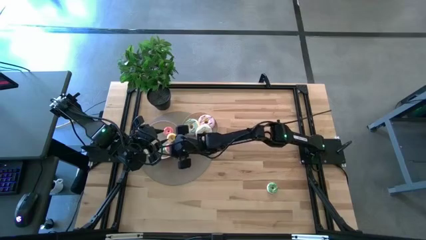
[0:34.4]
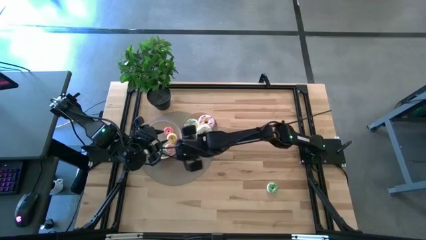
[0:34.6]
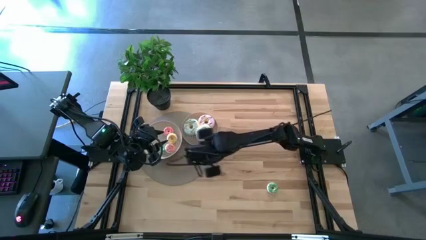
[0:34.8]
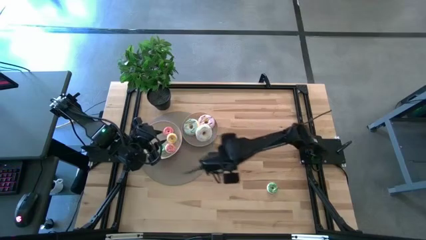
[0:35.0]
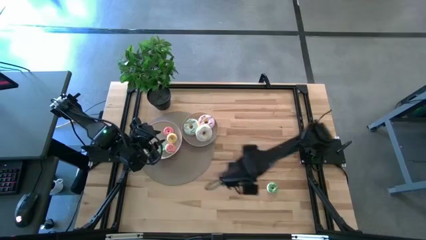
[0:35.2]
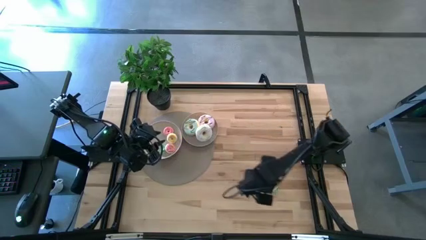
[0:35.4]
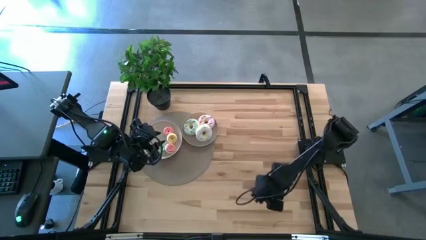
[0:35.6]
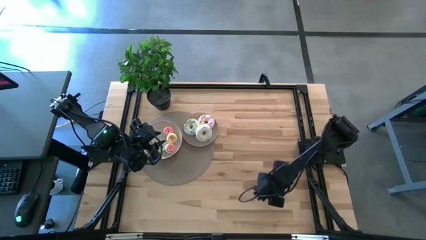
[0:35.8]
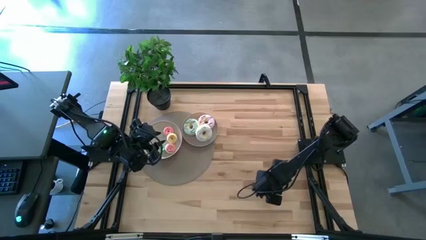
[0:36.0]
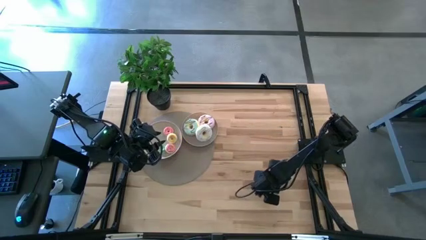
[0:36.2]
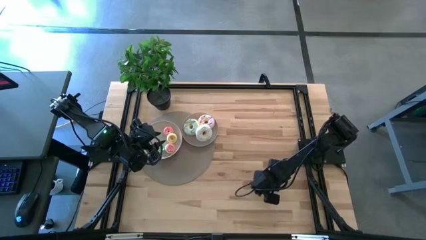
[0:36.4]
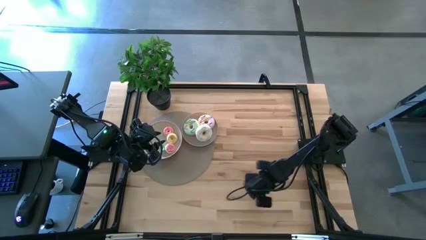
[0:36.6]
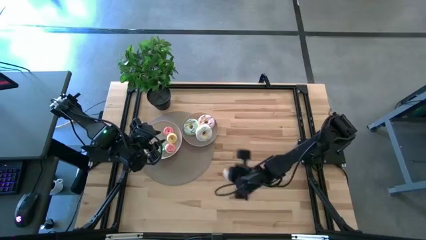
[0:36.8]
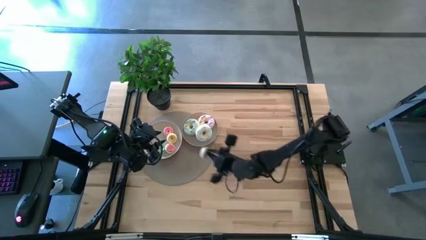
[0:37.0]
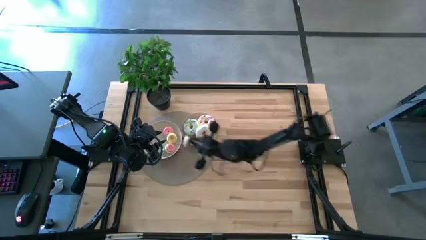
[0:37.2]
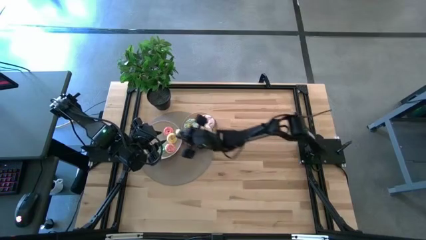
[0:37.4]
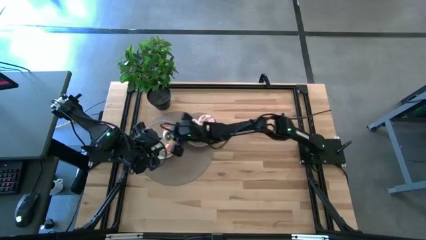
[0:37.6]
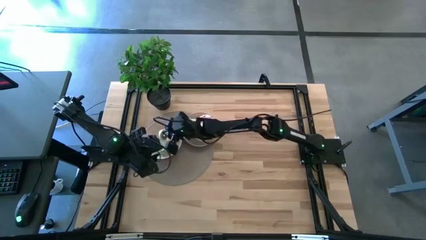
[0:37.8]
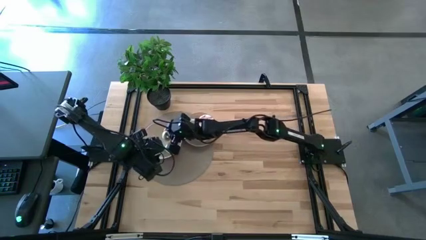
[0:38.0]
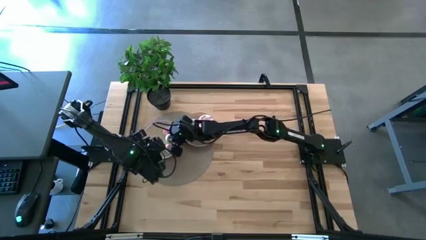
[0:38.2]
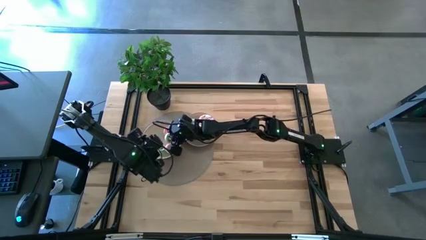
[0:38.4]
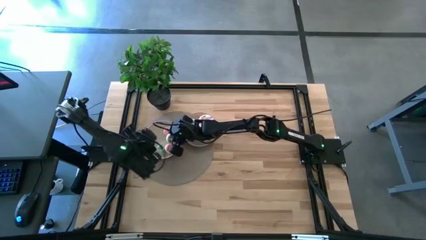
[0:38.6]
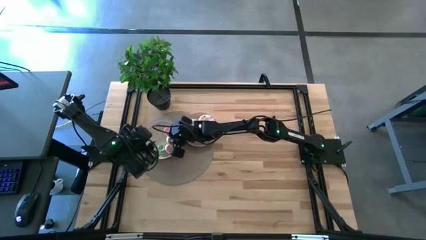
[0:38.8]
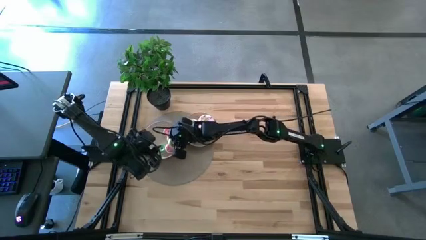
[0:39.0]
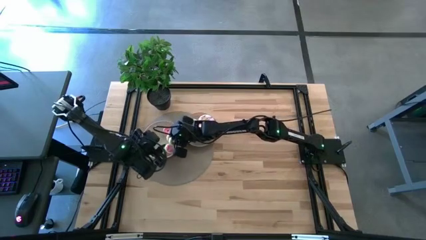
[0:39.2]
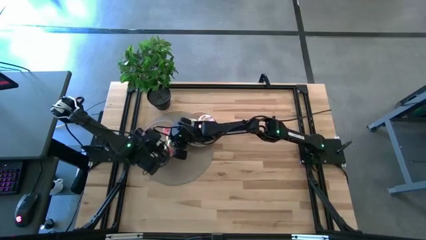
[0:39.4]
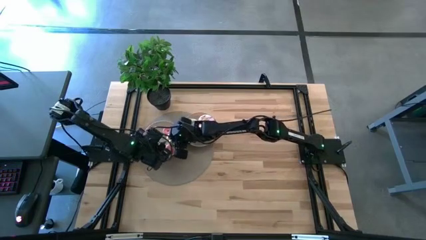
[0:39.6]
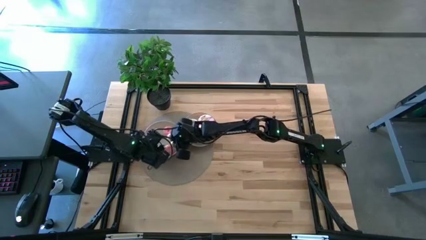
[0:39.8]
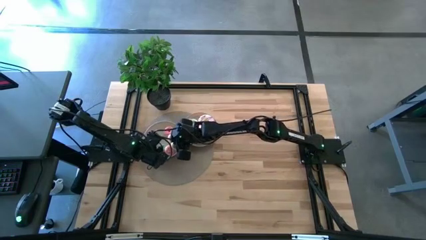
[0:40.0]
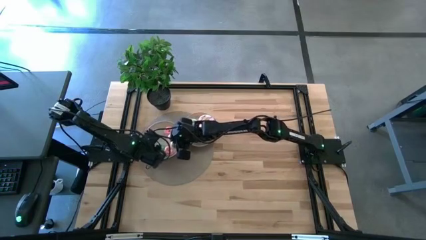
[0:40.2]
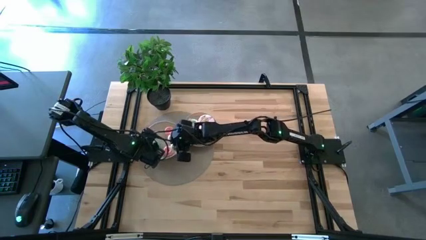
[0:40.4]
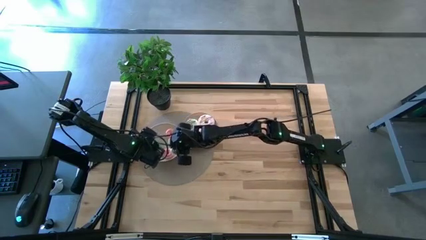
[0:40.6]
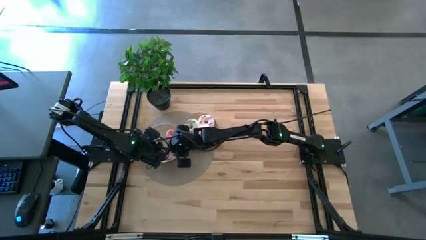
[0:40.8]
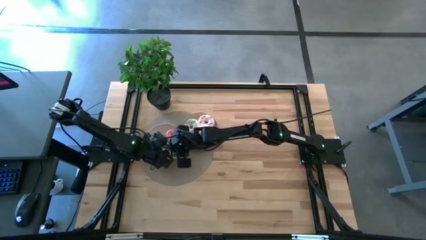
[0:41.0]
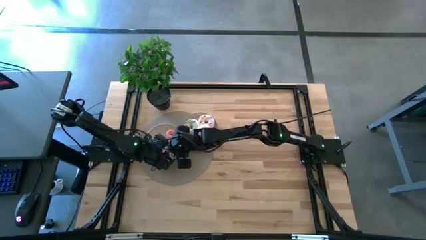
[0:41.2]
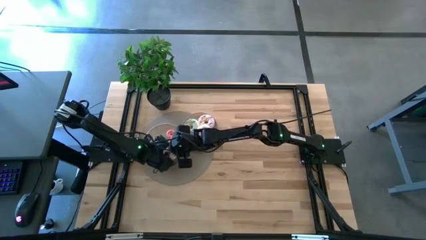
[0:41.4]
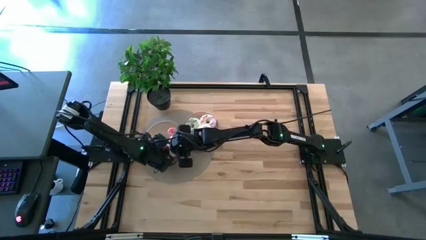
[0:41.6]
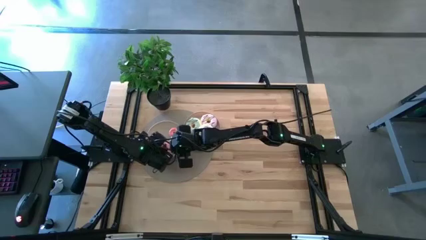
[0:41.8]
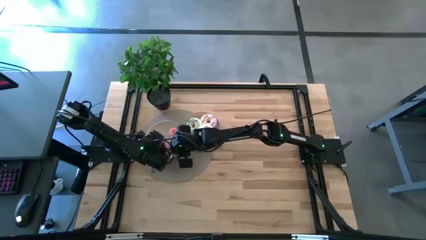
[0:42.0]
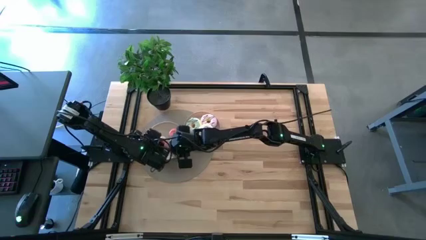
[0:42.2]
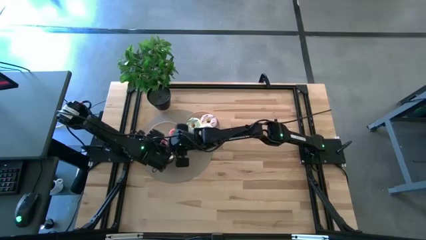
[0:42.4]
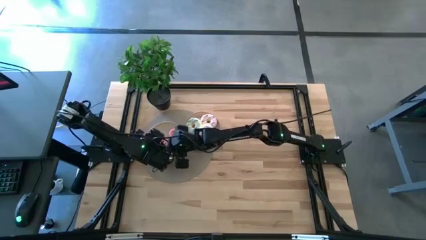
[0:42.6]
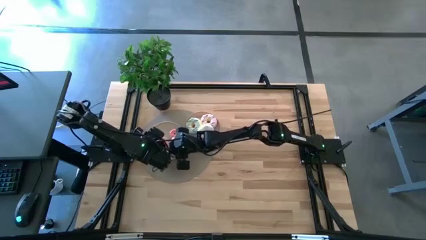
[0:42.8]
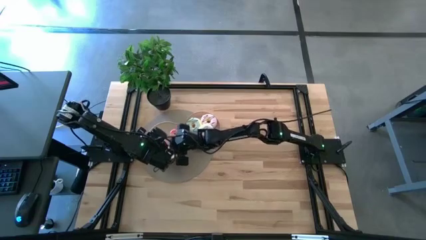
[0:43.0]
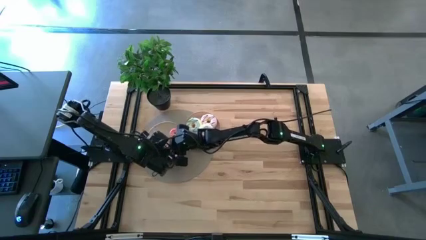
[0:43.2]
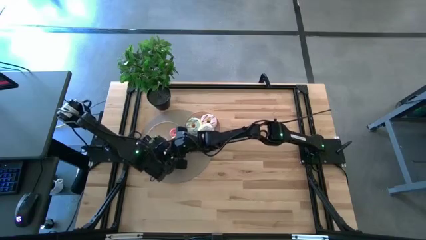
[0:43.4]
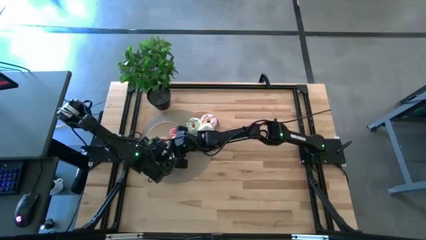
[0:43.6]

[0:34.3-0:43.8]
Task: Pick & Place donuts
Put the small green donut on the white plate

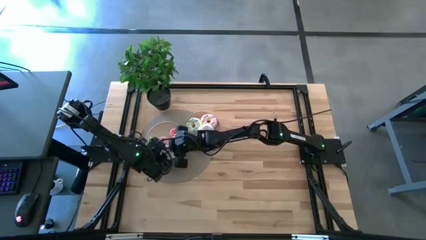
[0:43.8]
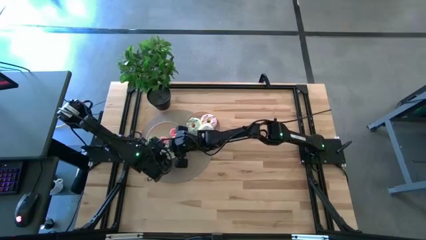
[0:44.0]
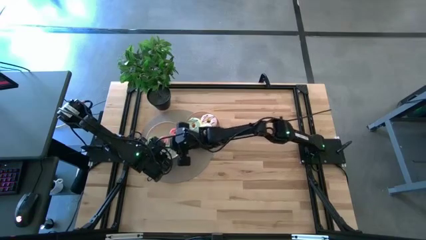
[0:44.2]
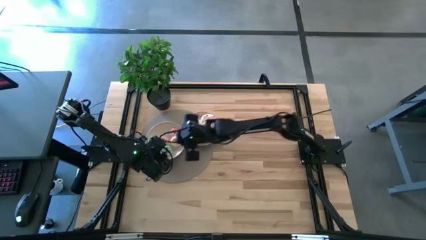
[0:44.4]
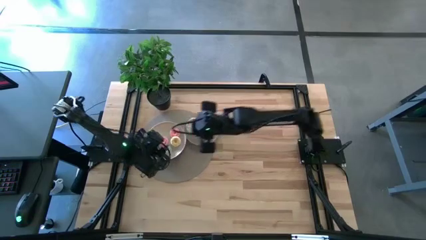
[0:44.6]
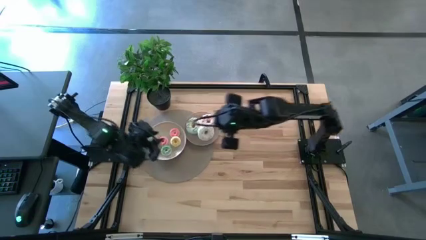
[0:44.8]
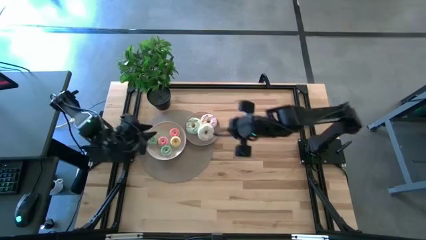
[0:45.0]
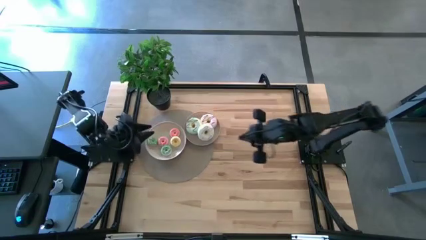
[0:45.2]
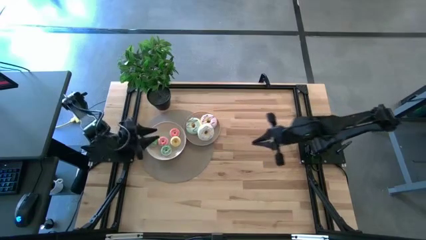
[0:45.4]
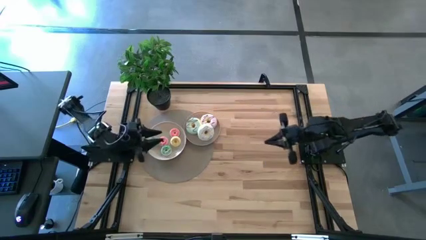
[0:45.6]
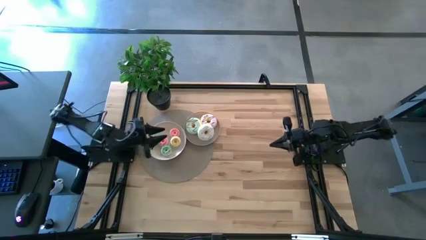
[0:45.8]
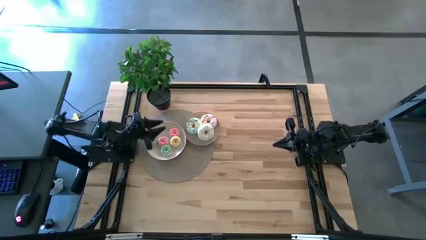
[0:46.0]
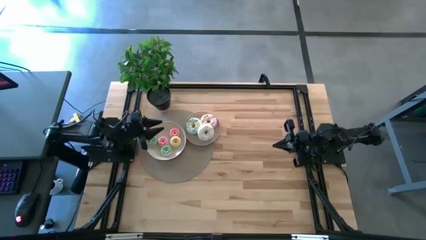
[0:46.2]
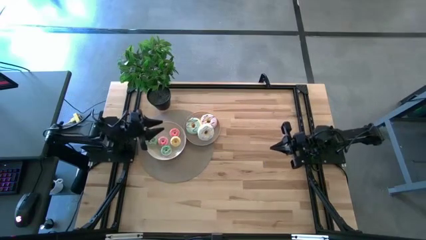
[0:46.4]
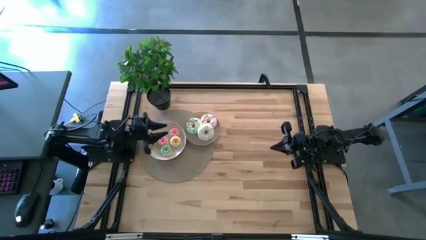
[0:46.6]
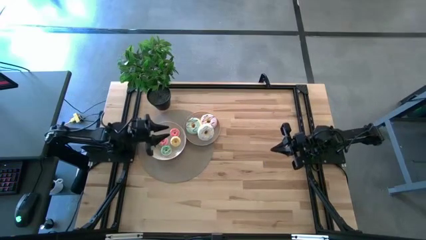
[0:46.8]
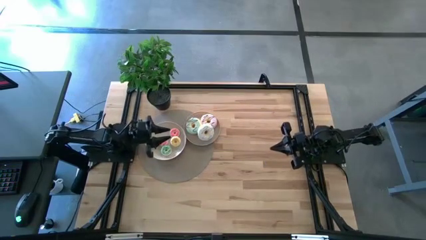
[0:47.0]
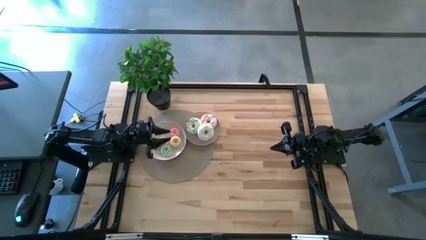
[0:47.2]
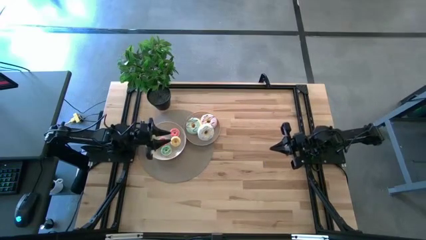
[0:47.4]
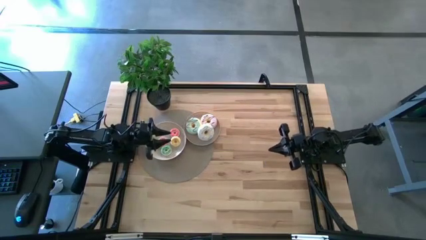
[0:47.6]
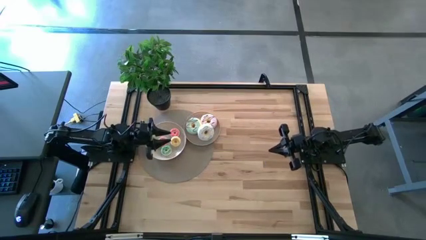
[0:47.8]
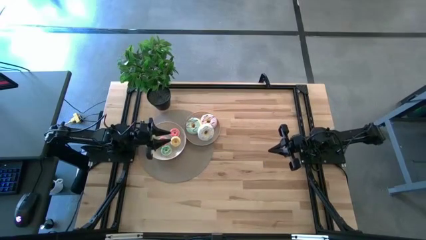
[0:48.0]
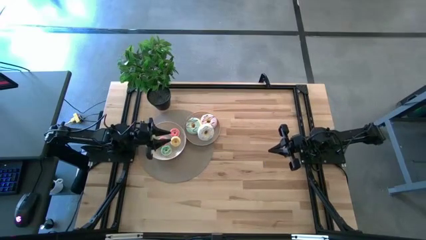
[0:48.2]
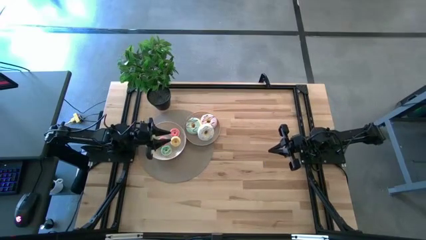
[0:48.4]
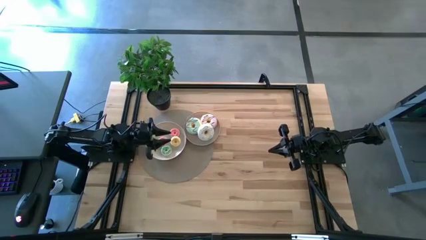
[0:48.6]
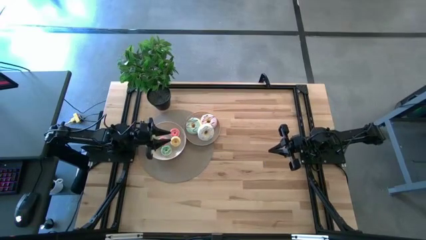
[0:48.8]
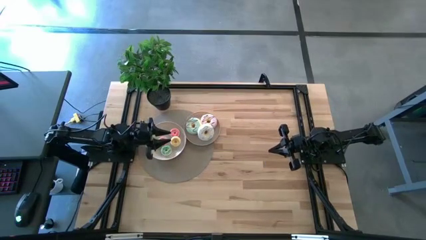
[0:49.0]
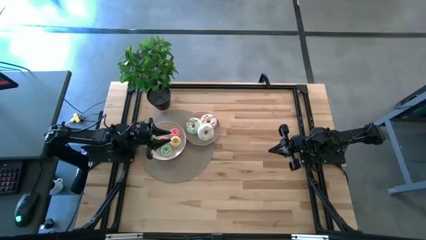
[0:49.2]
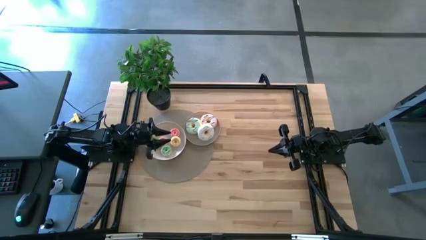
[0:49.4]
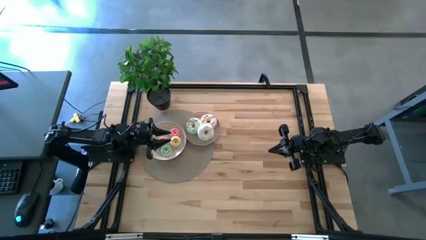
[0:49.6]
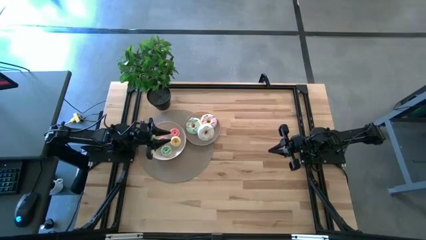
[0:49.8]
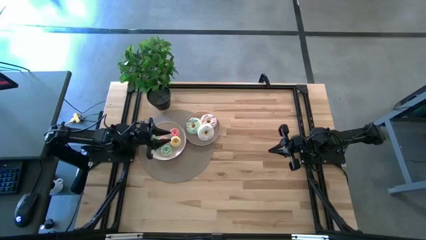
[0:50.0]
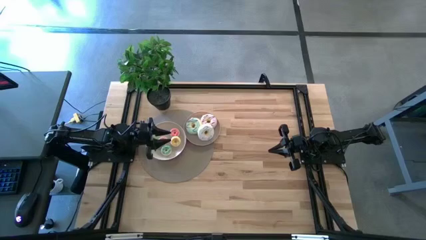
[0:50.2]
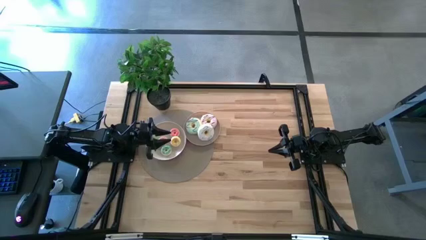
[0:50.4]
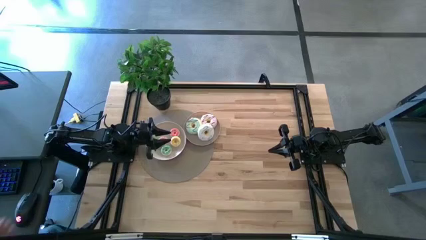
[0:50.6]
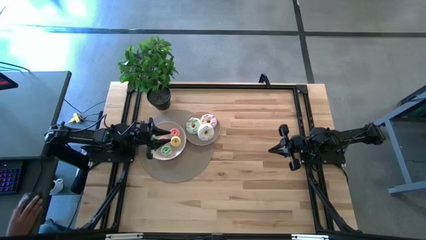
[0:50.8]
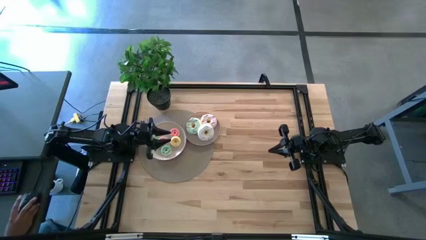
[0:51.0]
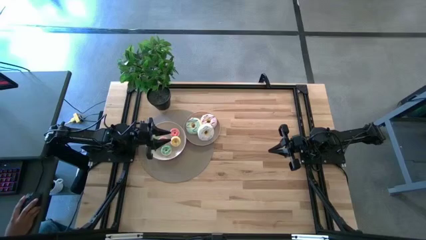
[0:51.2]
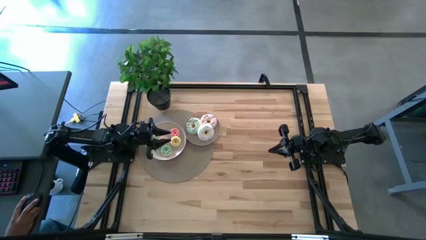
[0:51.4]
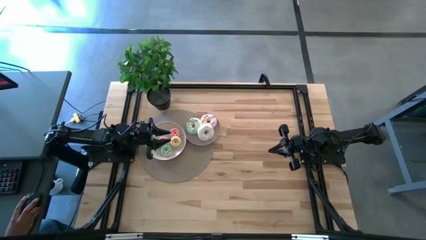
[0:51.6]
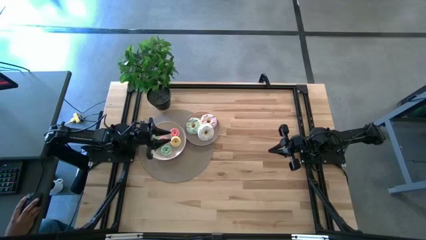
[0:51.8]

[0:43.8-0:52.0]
Return to Home Position
